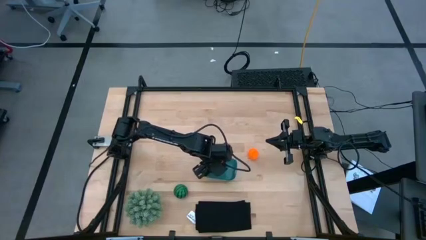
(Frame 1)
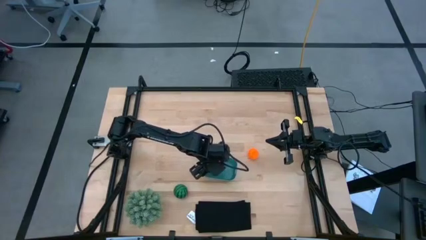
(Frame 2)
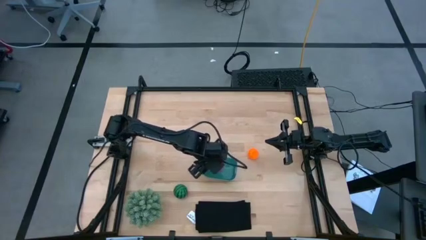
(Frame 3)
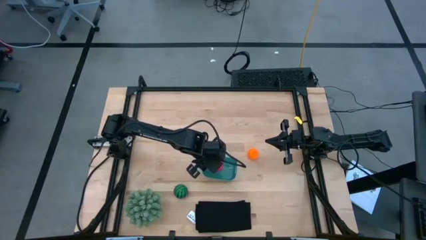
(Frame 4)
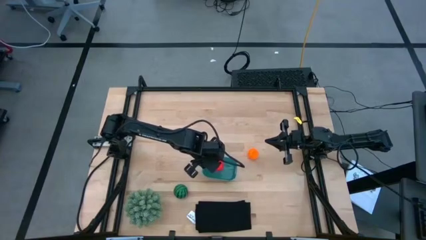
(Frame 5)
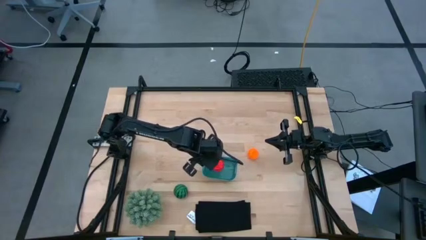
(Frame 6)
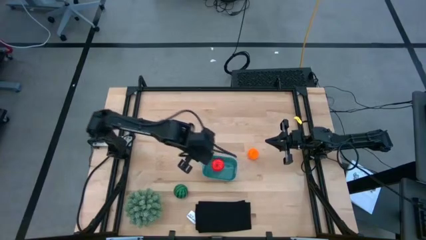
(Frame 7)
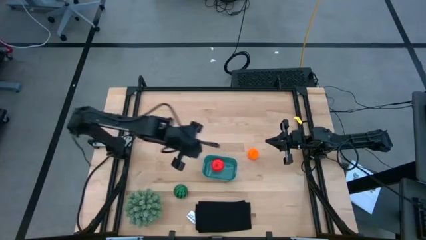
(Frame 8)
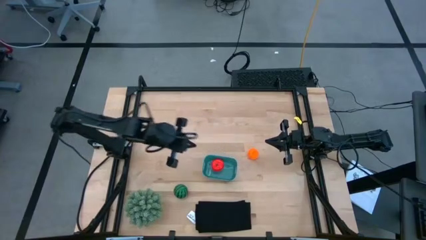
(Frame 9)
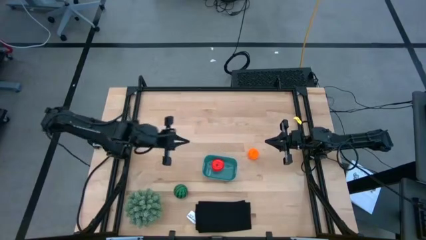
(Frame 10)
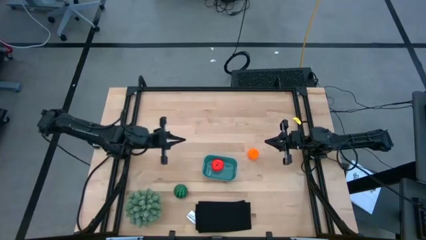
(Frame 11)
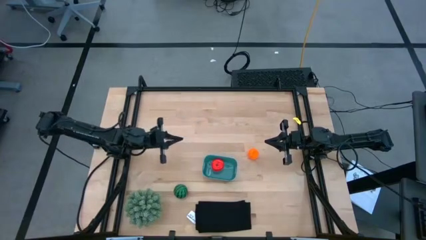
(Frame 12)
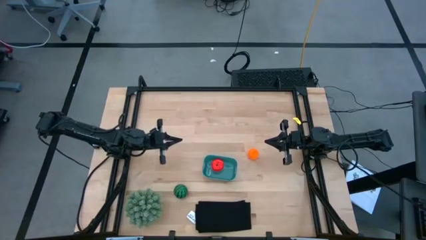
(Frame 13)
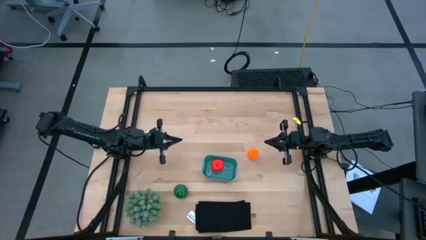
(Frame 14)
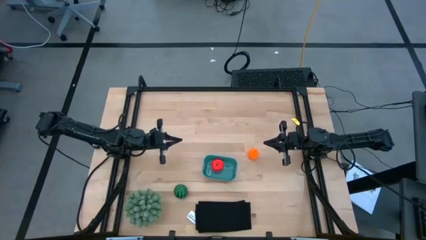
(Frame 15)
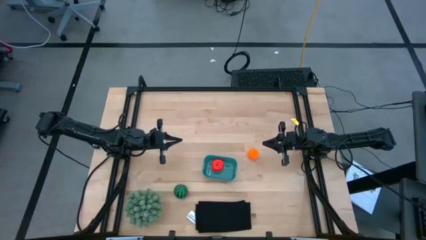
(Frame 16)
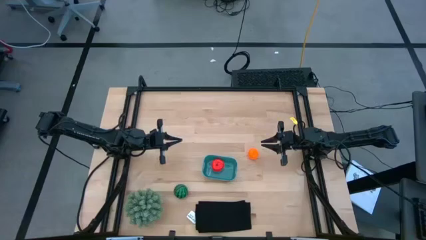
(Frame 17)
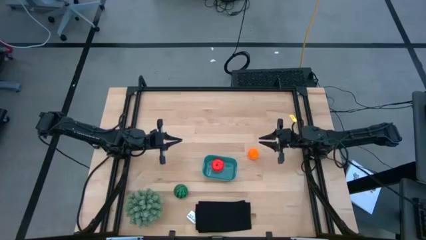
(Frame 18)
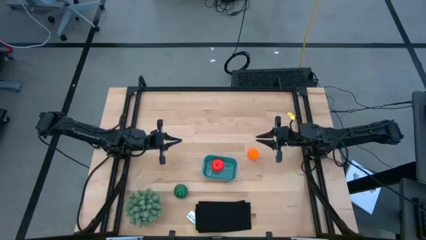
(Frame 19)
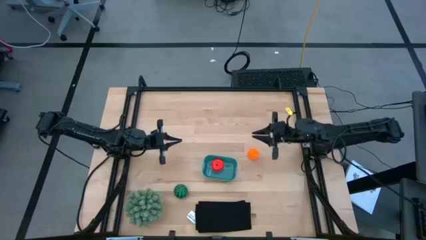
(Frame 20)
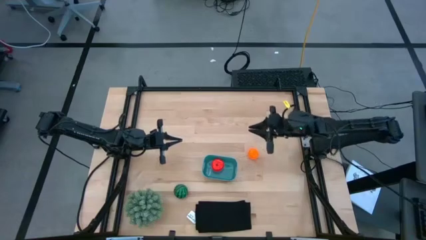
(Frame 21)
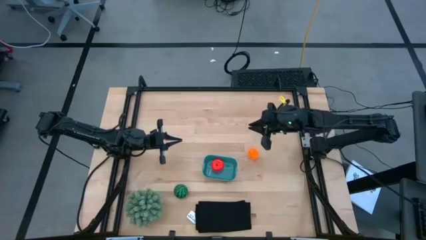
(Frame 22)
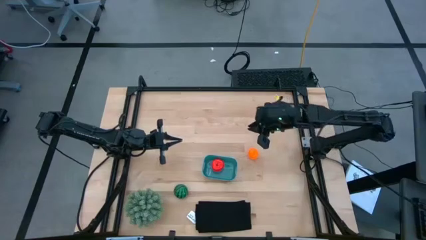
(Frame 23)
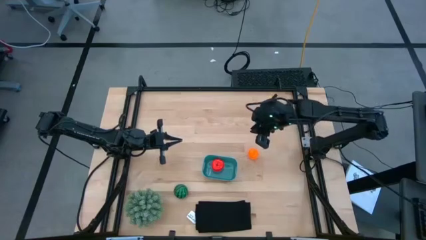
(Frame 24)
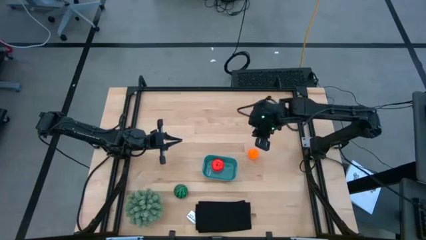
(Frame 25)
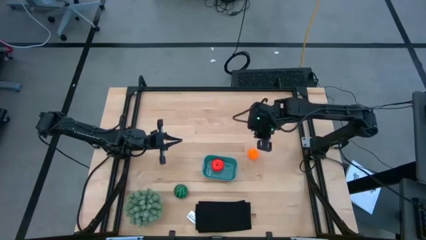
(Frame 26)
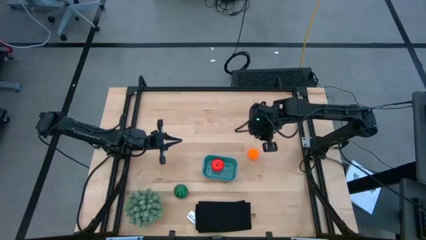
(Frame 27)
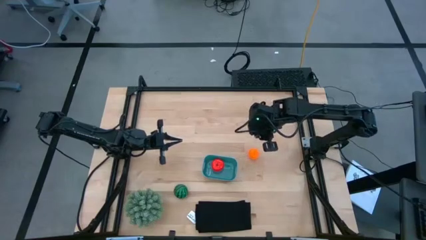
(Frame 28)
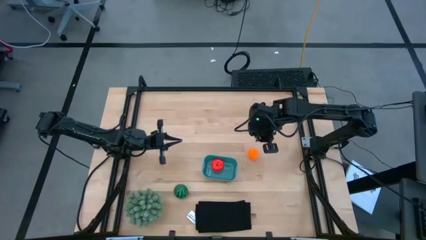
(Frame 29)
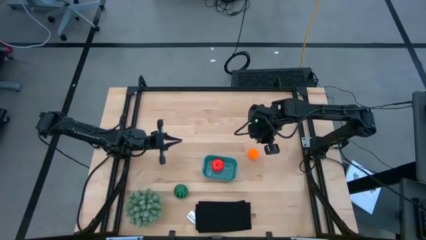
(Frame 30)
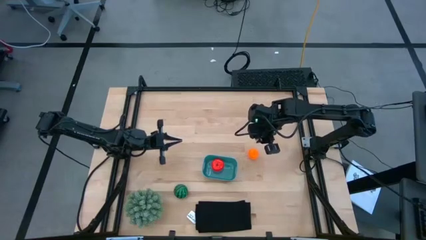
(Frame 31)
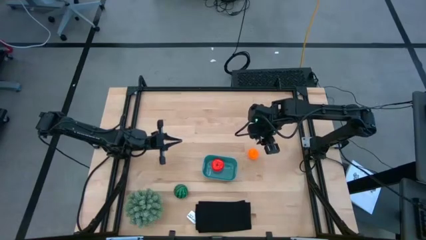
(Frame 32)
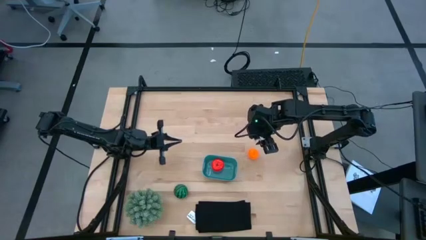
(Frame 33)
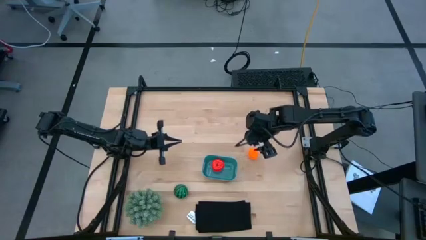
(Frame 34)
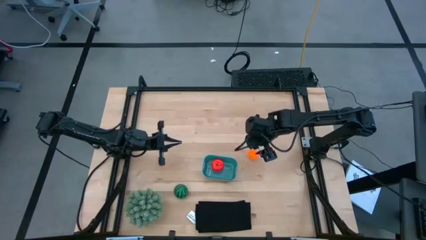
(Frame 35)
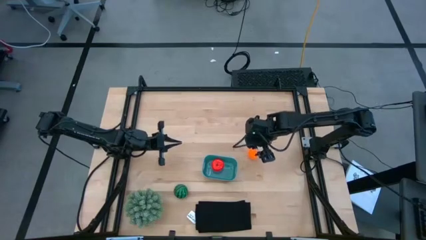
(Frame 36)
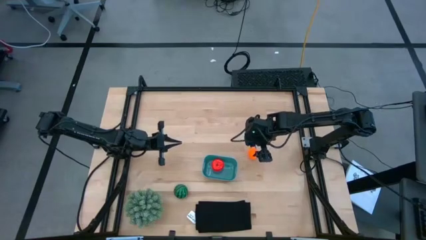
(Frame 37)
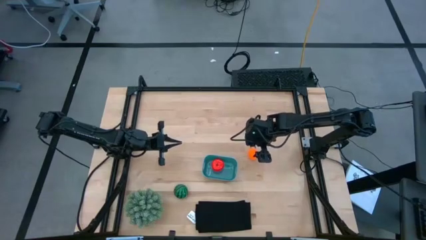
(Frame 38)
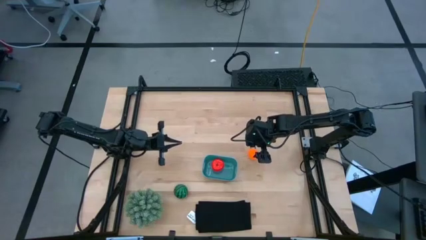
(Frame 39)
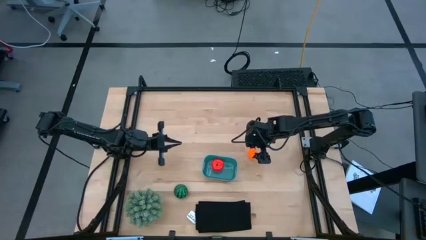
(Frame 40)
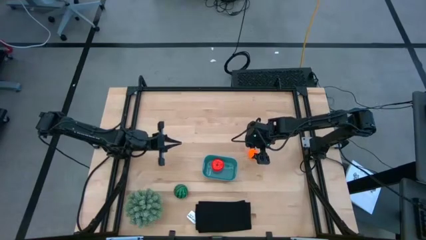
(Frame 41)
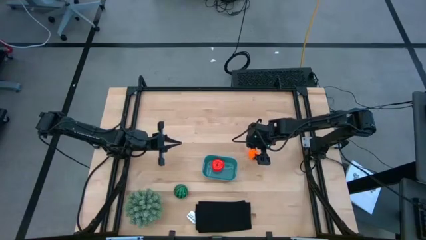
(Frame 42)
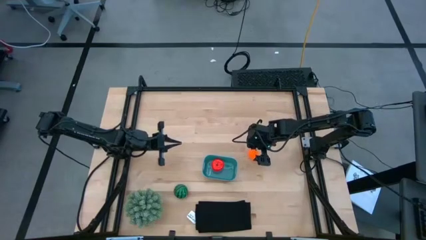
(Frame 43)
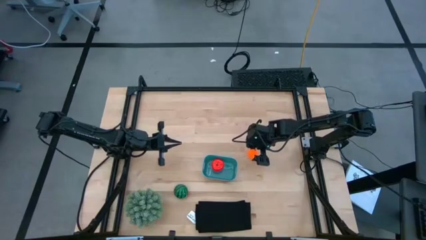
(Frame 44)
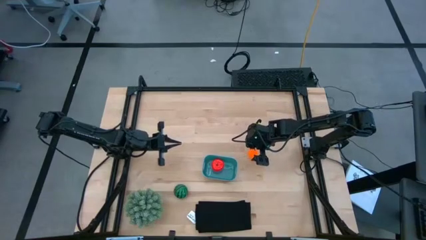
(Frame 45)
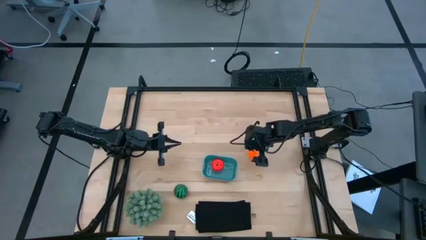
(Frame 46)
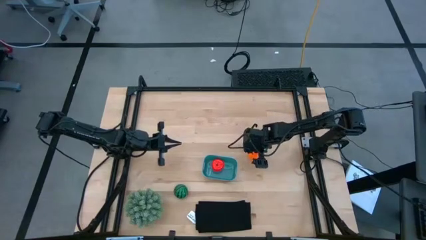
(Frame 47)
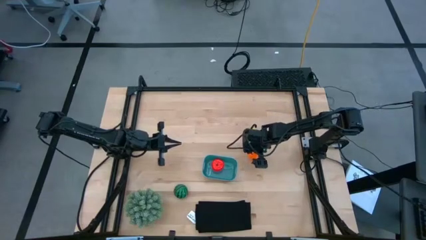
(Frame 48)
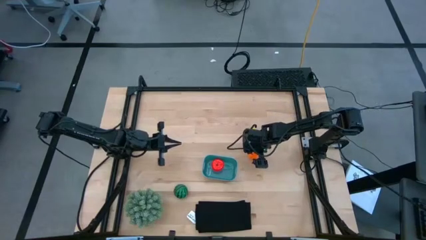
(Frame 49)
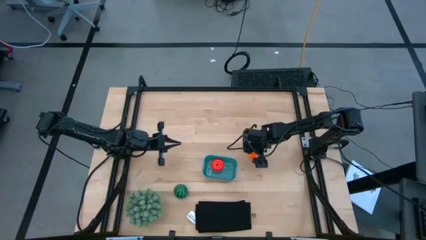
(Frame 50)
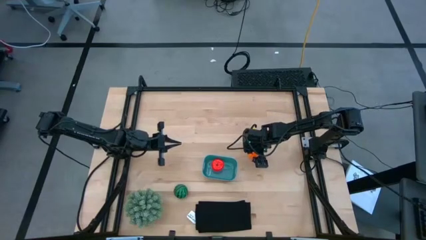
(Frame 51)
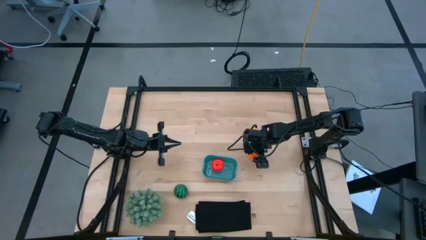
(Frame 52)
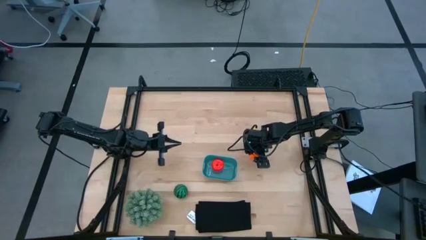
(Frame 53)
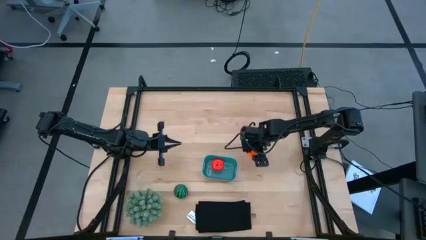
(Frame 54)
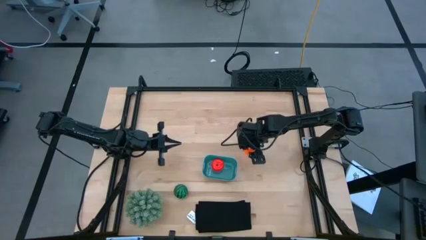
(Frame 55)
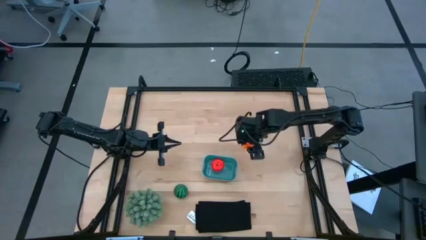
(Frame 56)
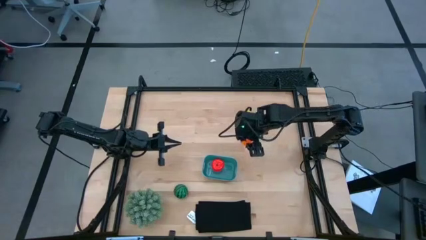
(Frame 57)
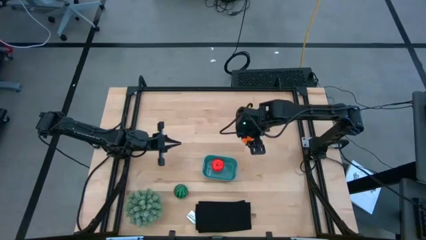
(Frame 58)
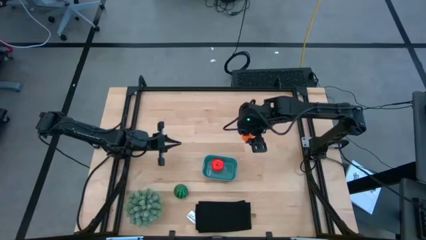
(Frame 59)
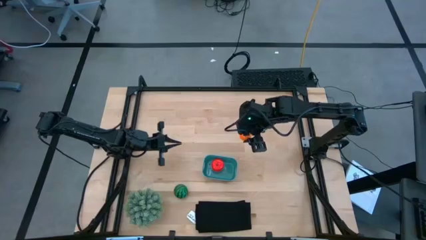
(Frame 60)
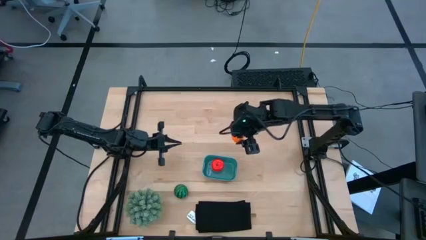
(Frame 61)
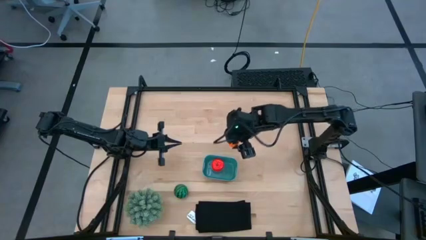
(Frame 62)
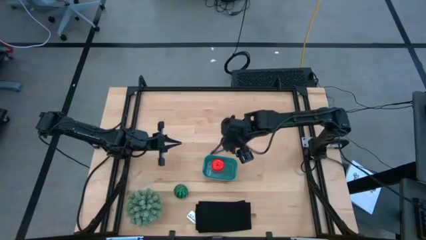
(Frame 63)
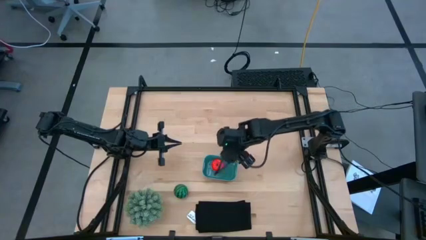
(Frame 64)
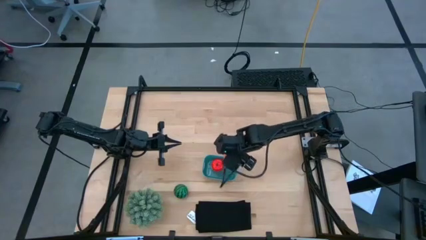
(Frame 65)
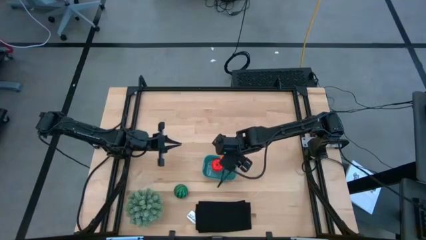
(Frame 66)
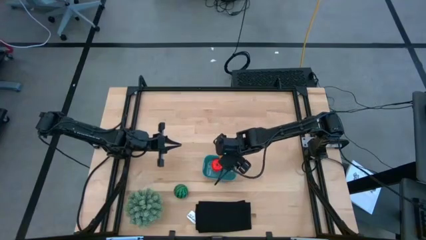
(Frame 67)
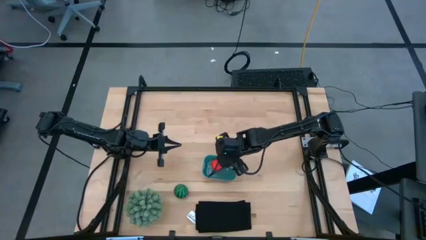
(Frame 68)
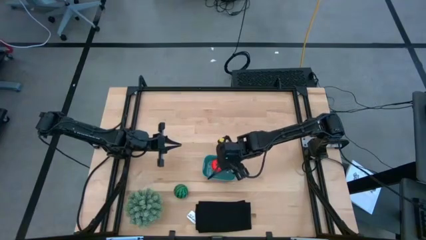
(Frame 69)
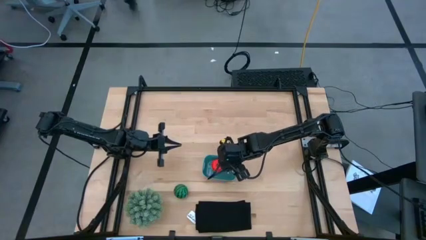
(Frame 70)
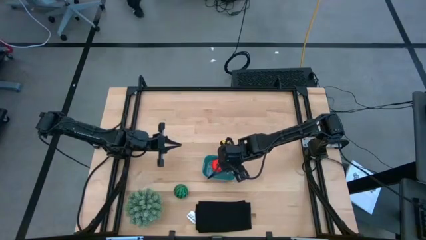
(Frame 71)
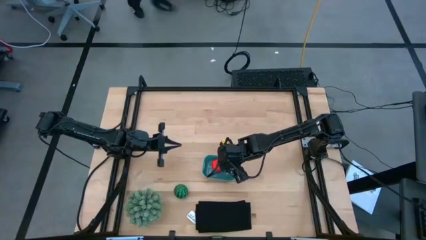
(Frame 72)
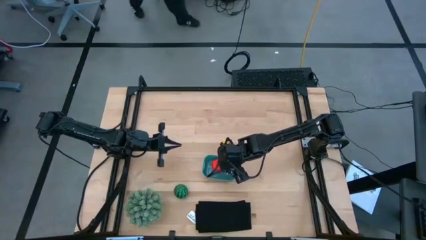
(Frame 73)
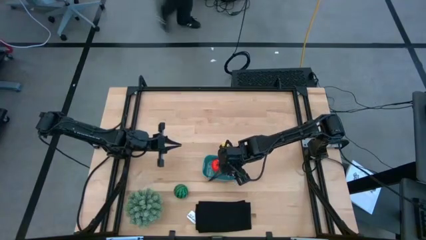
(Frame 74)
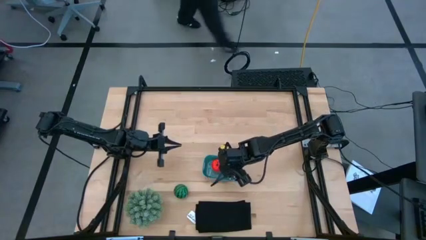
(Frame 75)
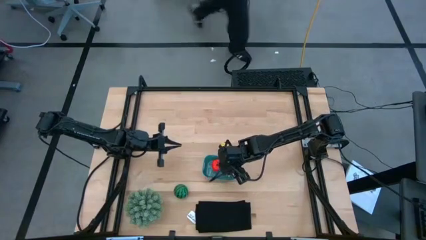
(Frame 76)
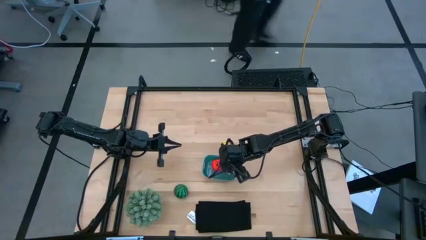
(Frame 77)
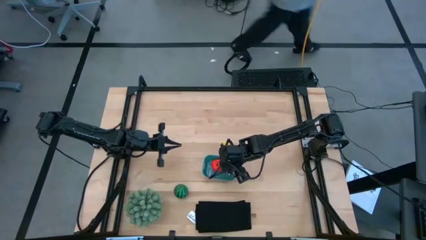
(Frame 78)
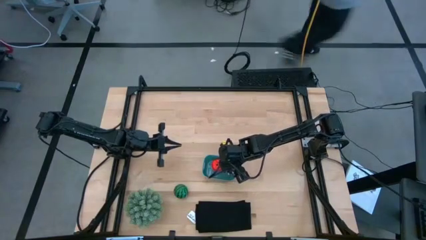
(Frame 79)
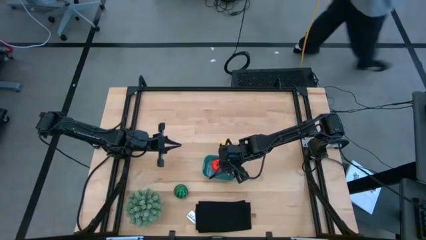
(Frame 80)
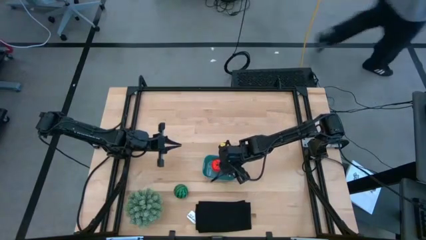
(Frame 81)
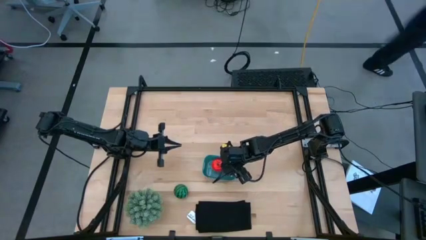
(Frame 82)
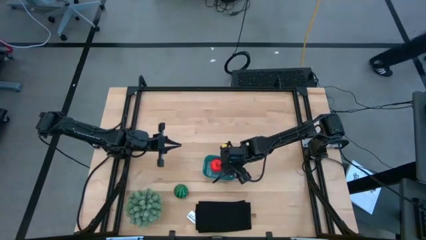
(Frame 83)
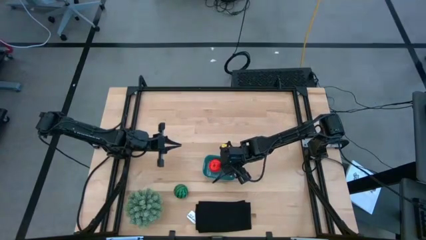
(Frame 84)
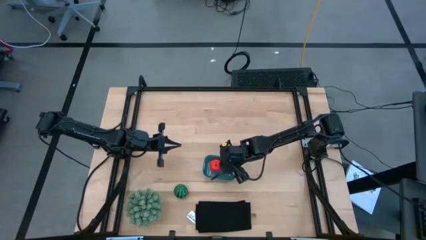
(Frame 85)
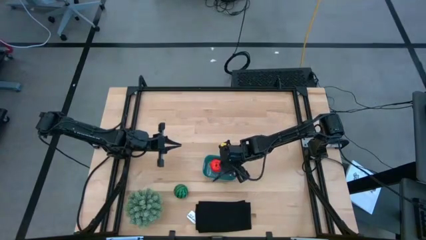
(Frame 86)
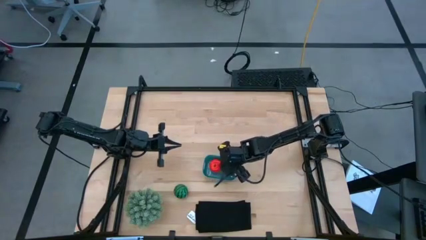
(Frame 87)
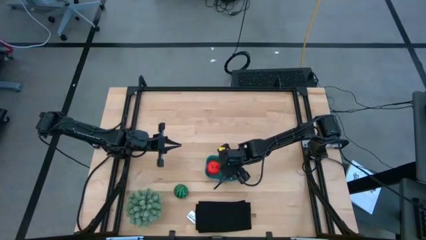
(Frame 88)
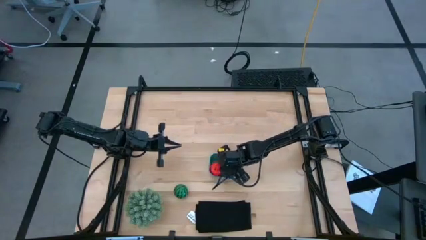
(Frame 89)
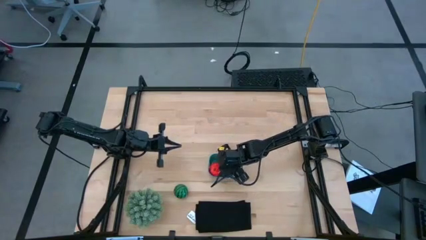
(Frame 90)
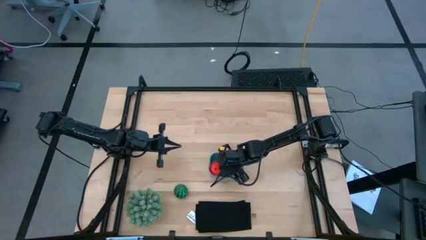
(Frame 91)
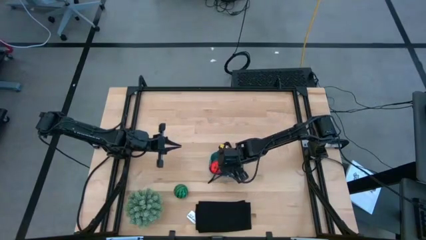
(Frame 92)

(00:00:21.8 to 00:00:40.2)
Task: Pick and placing Produce into tupperware
Put the pumpkin into the basket
